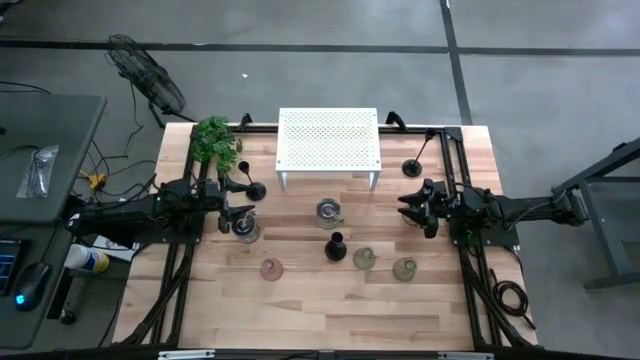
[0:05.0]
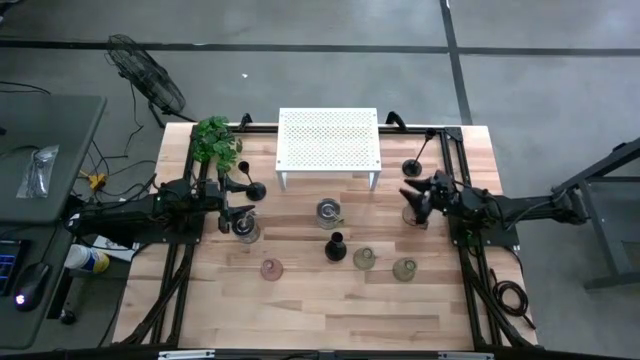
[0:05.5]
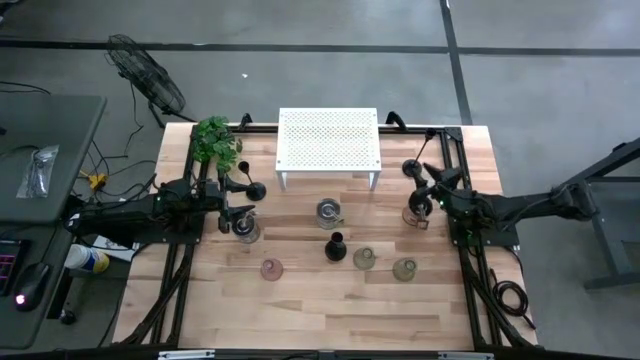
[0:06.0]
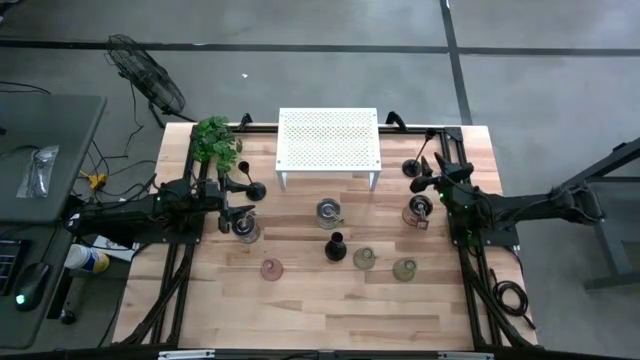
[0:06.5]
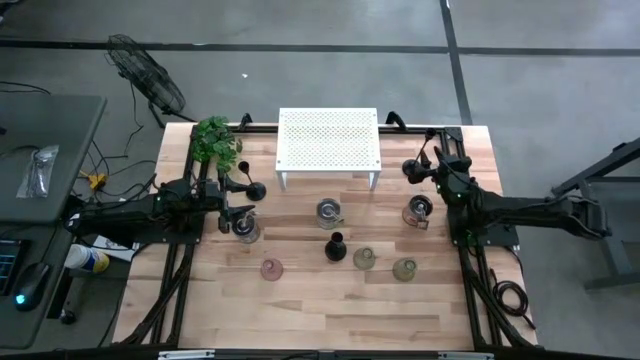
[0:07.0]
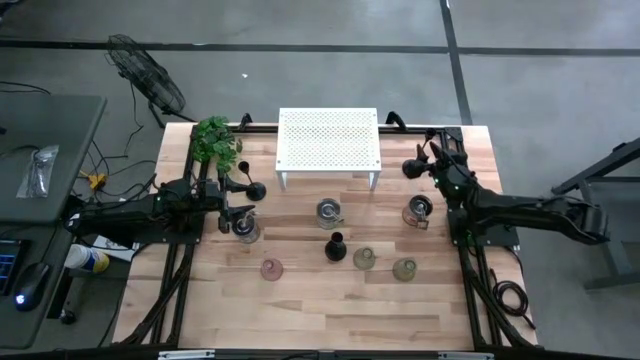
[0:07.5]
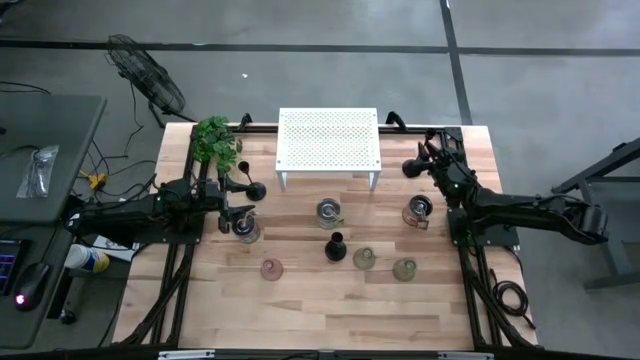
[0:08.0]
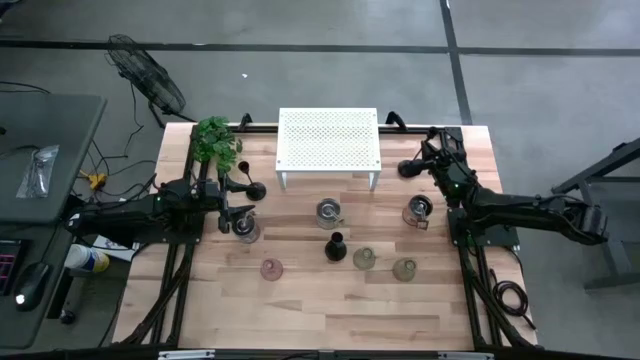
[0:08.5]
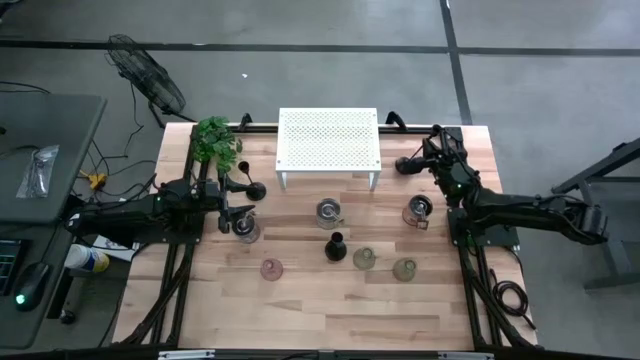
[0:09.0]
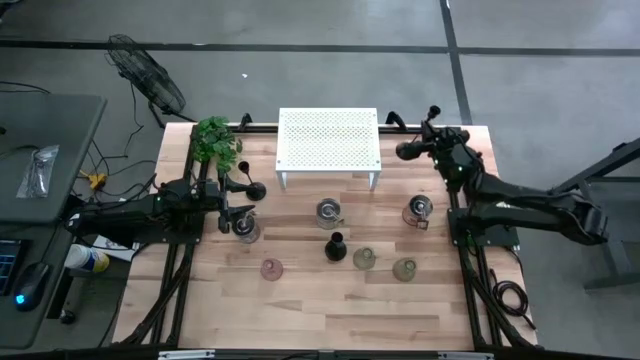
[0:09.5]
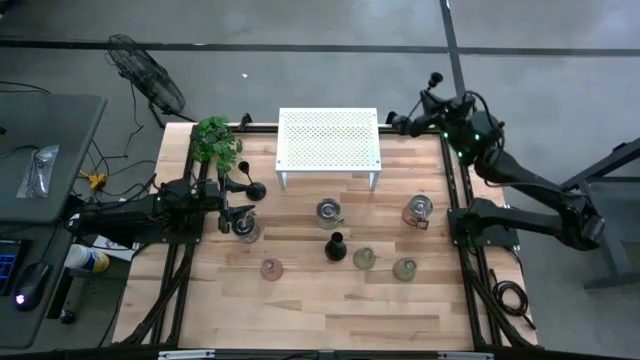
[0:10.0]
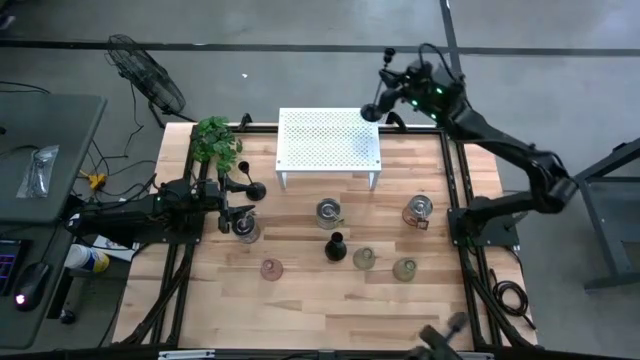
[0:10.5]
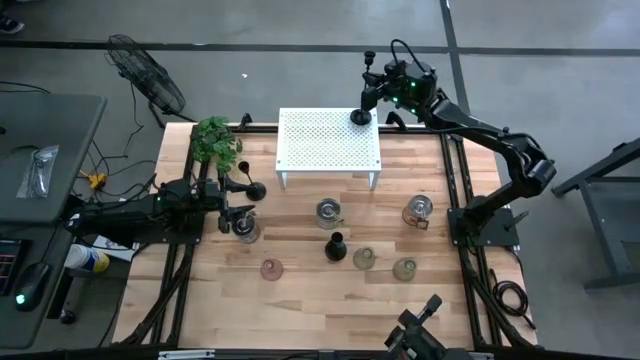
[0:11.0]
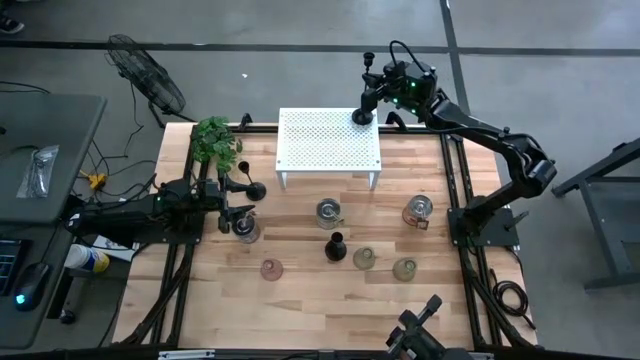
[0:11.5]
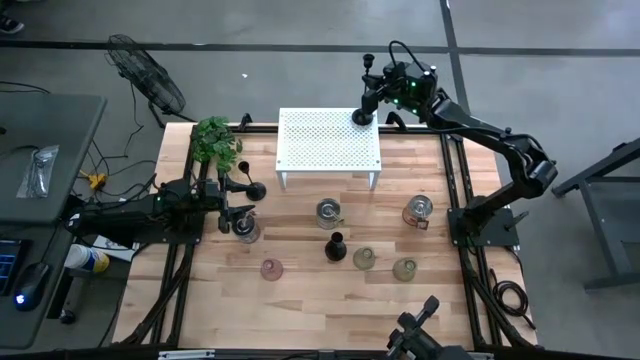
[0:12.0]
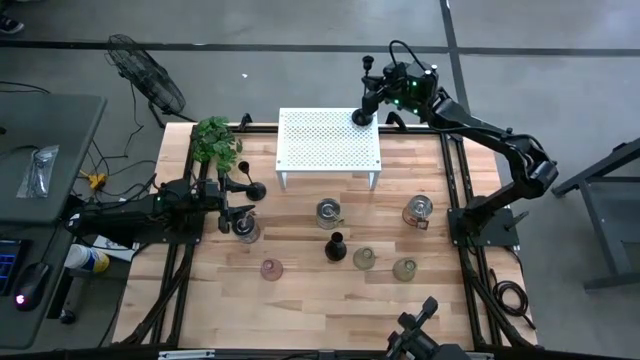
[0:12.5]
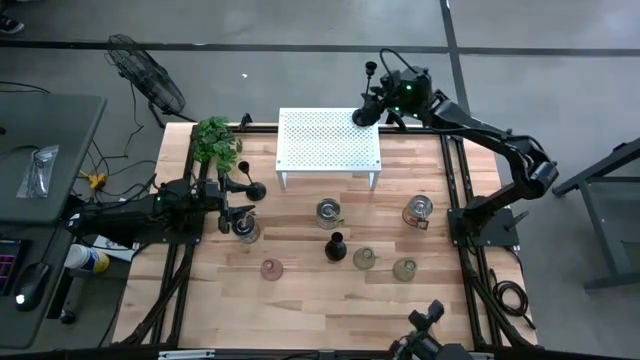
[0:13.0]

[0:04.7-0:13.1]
Task: Pick & Place candle stick holders
Put the top right black candle holder on the shelf

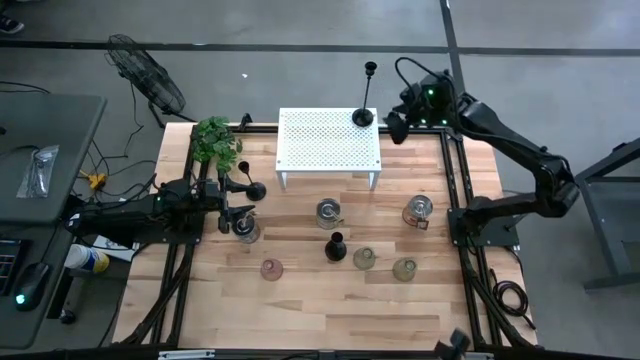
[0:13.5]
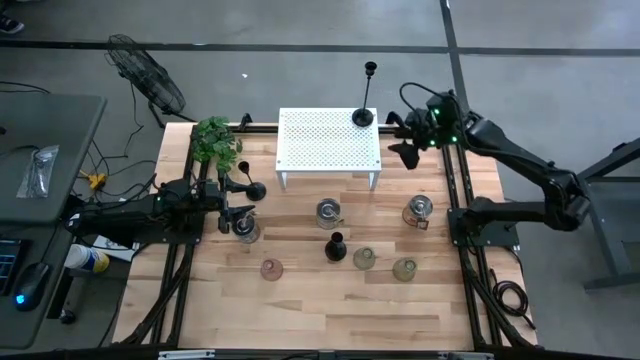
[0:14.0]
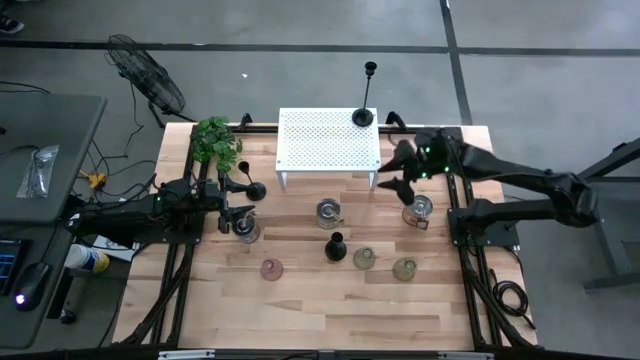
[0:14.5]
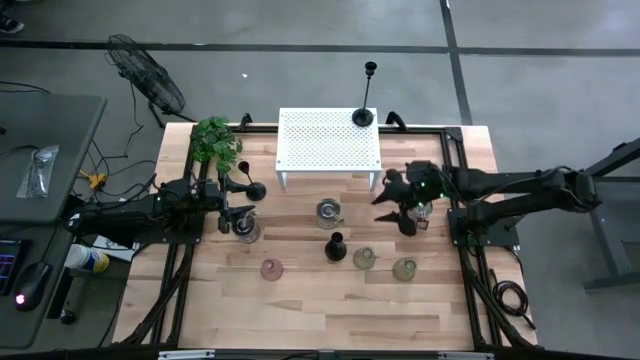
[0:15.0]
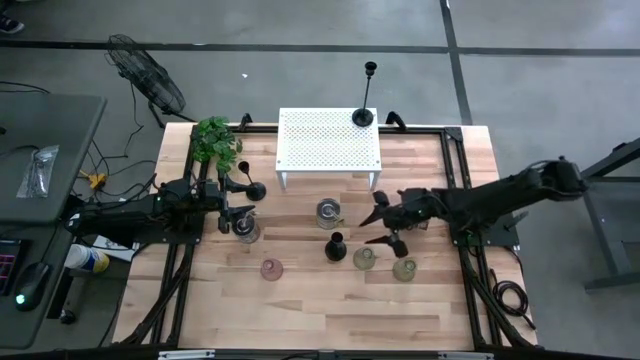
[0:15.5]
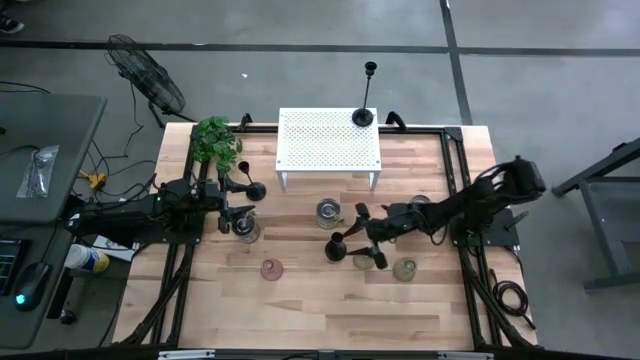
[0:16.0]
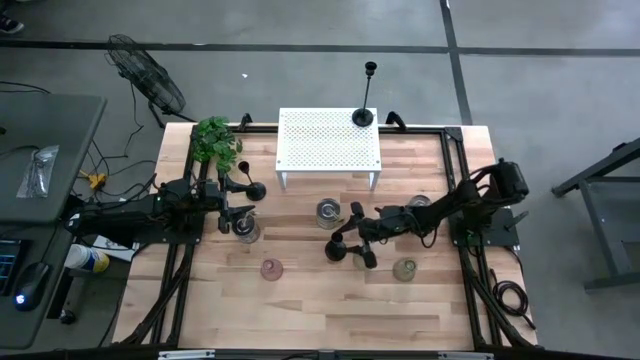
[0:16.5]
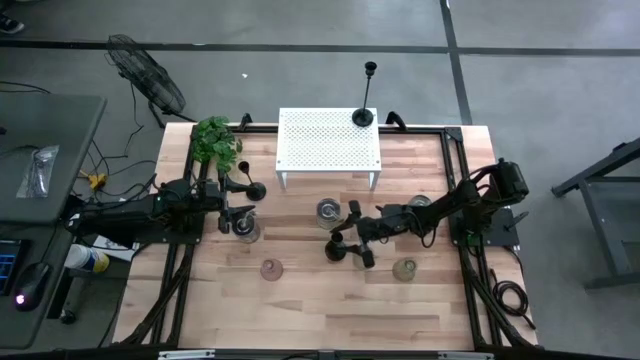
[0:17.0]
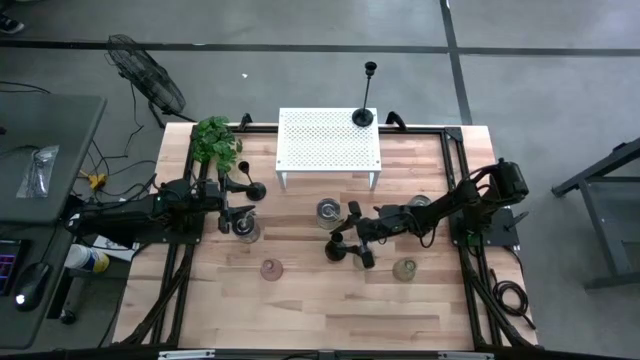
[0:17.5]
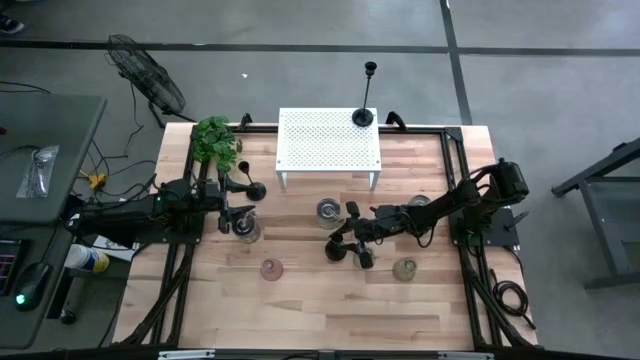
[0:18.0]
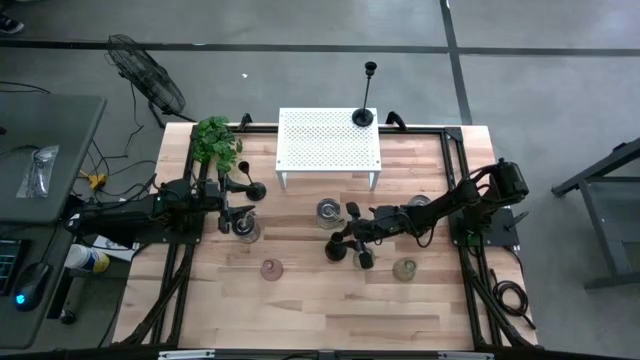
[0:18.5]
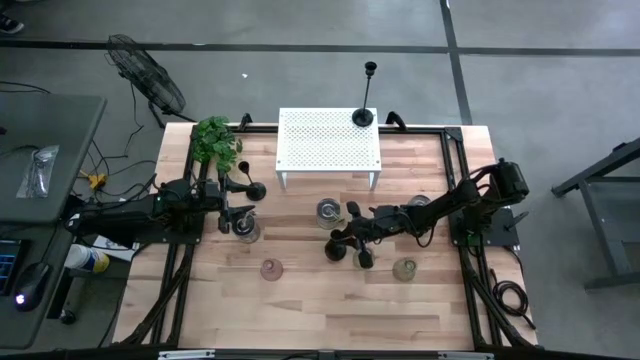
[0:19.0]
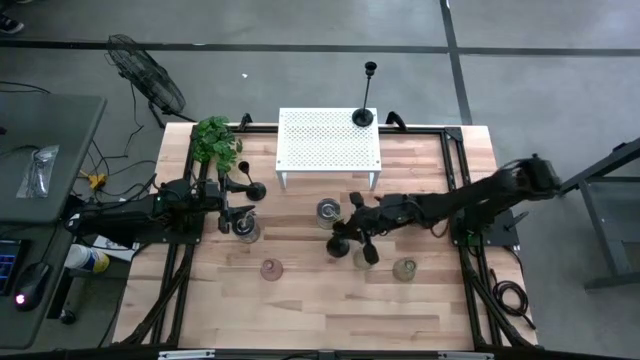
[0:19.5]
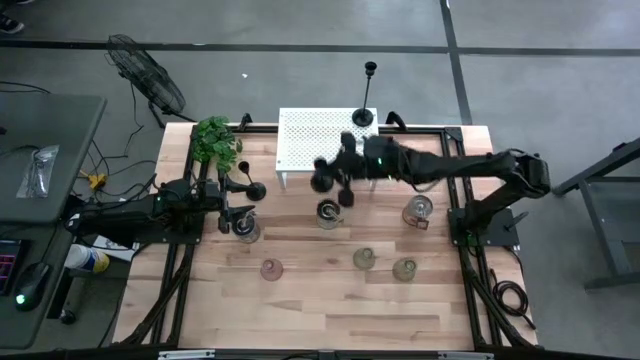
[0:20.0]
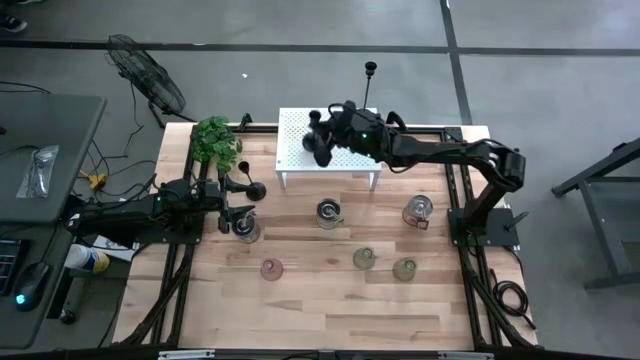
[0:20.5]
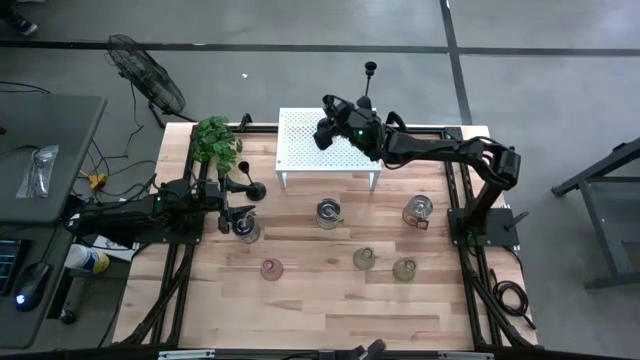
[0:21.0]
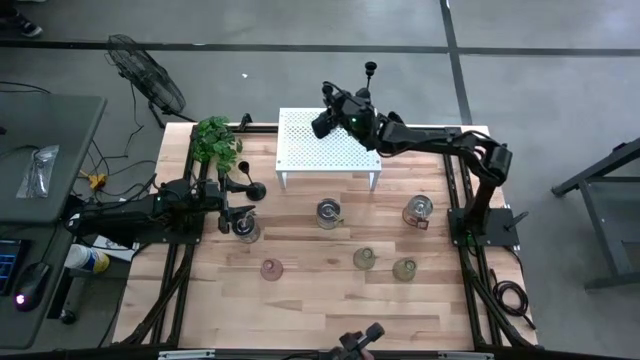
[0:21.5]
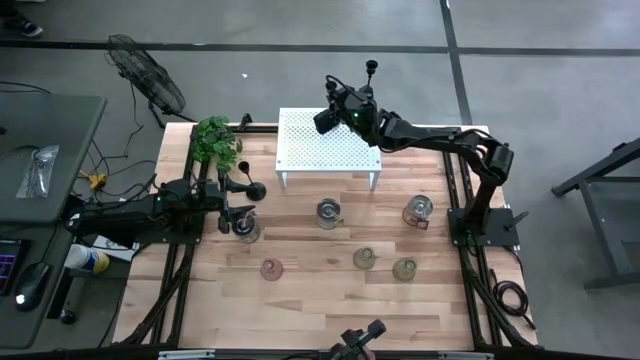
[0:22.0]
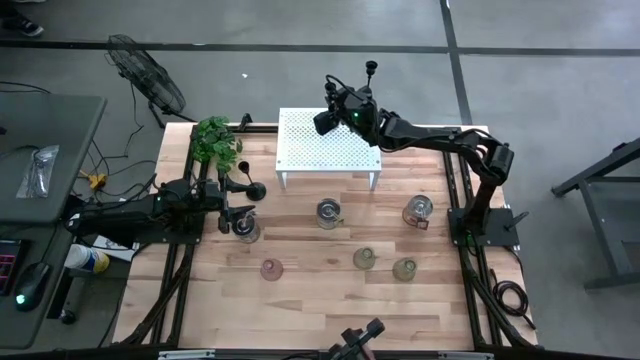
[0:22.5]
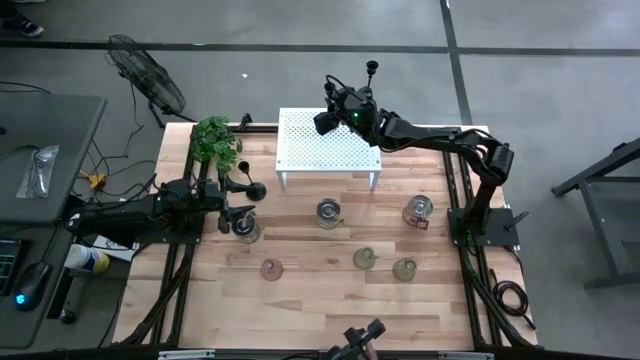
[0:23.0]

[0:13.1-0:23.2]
Put the bottom black candle holder on the shelf

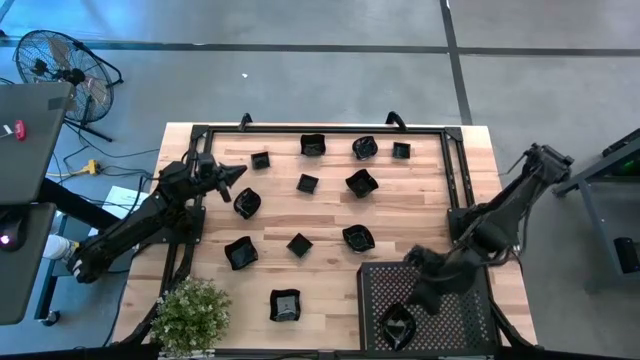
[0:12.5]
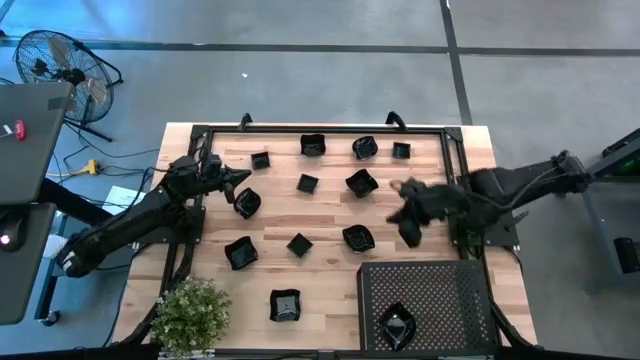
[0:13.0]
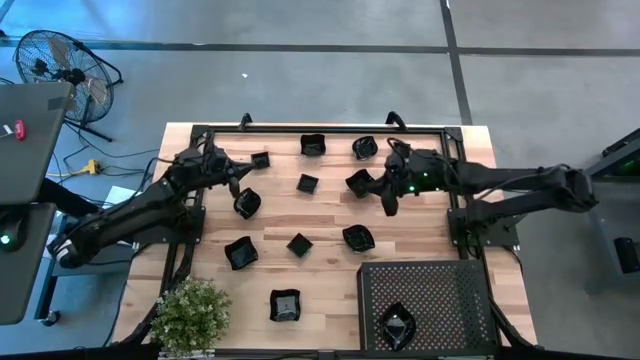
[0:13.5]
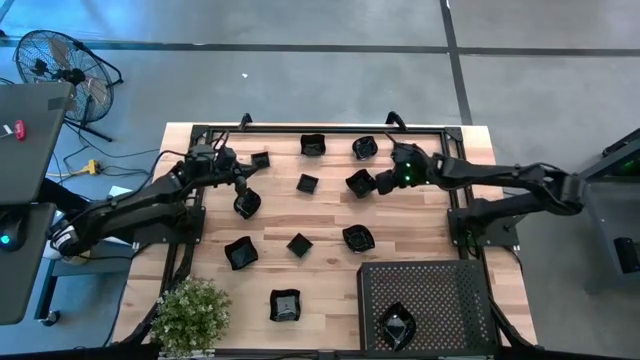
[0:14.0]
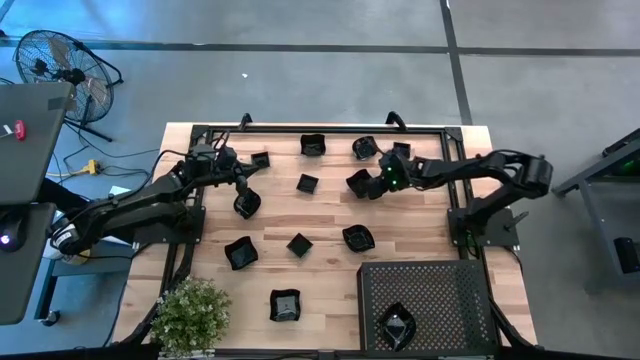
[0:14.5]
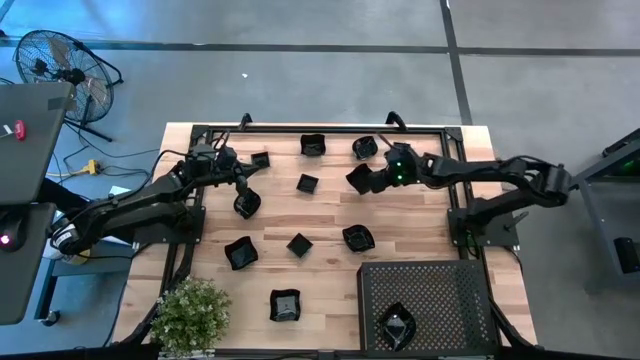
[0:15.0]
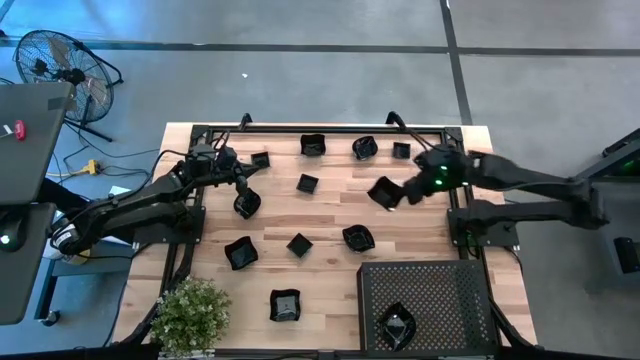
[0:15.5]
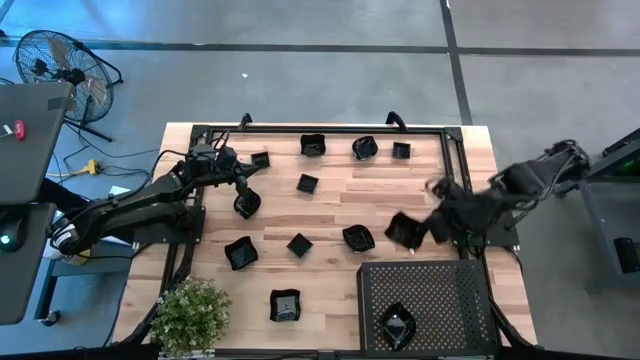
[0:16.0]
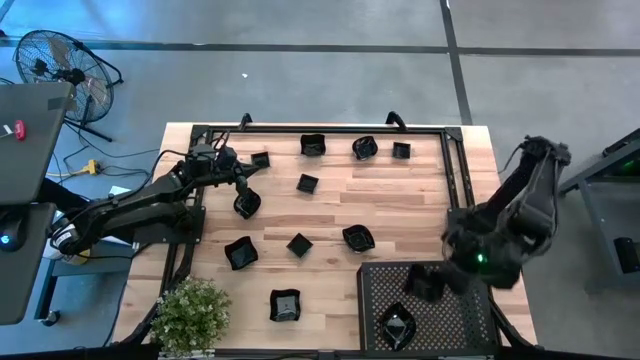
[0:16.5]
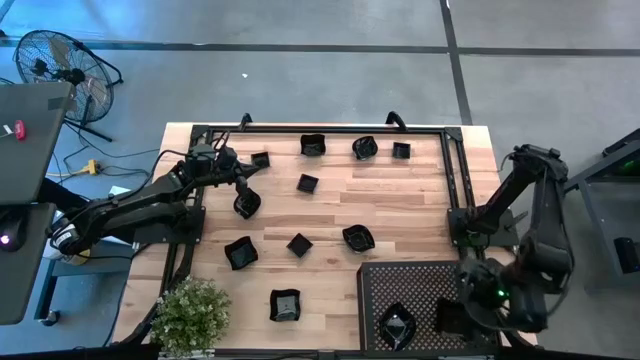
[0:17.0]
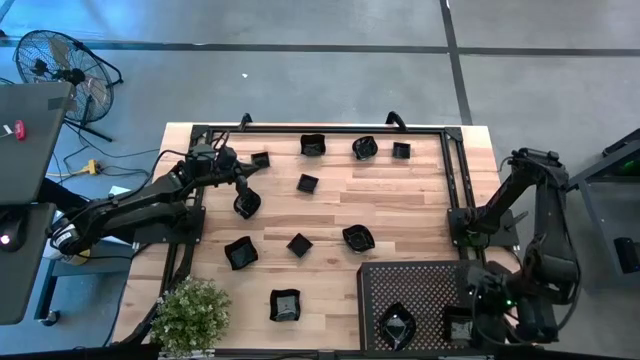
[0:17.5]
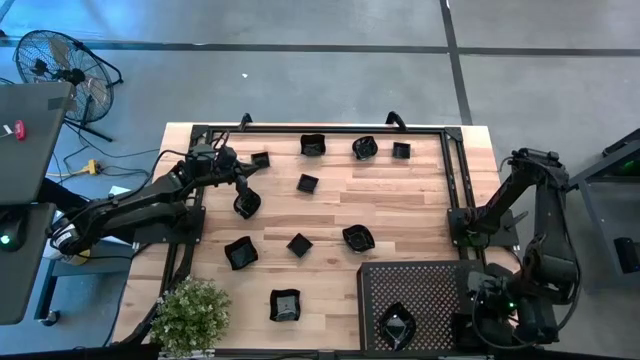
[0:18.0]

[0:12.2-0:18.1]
Task: Pick & Place Mini shaped plates
Put the black distorted square plate on the shelf
